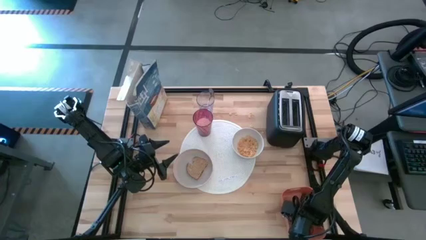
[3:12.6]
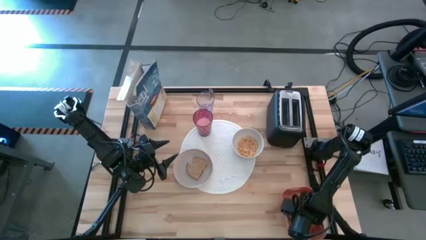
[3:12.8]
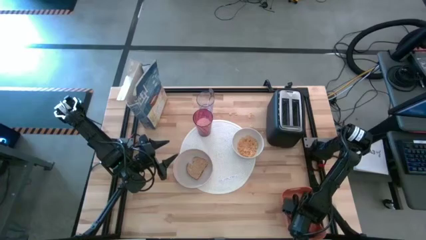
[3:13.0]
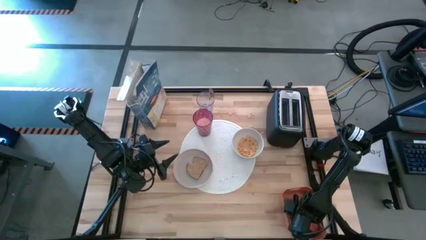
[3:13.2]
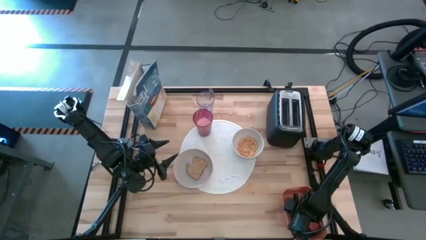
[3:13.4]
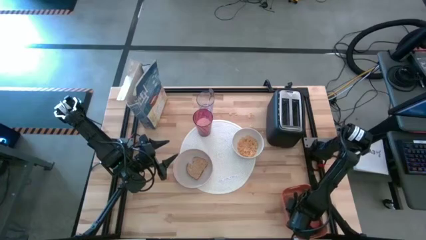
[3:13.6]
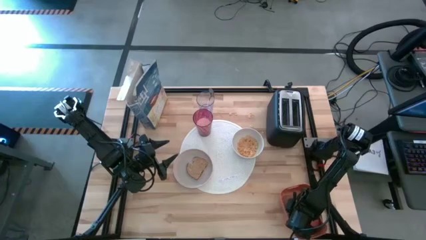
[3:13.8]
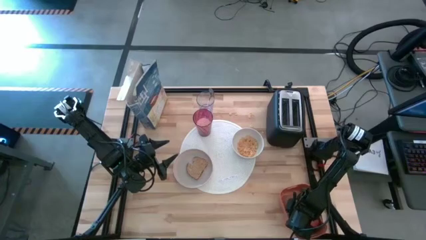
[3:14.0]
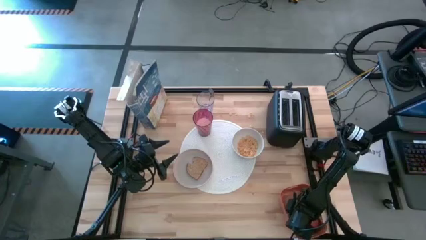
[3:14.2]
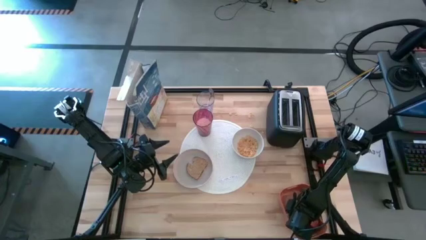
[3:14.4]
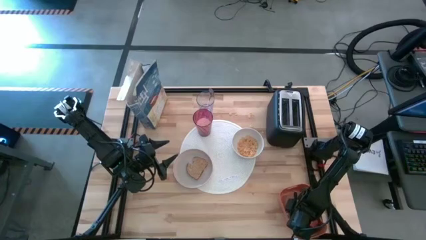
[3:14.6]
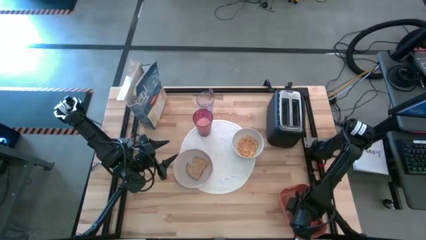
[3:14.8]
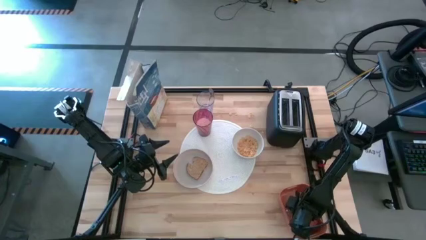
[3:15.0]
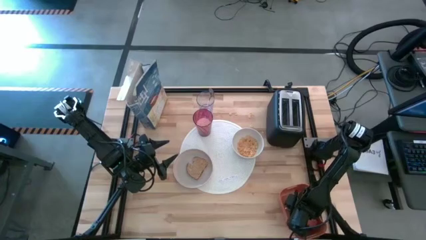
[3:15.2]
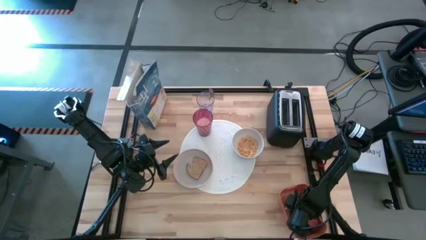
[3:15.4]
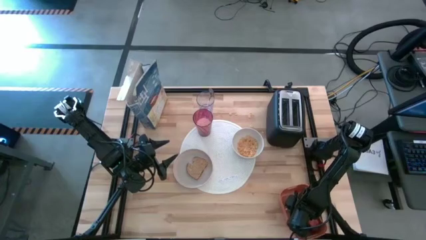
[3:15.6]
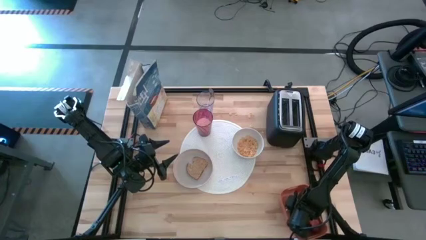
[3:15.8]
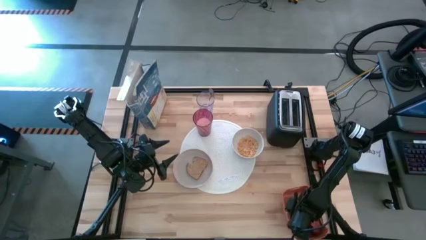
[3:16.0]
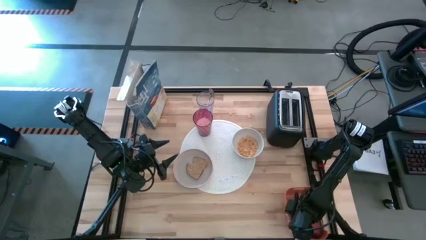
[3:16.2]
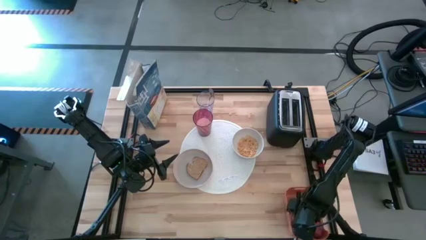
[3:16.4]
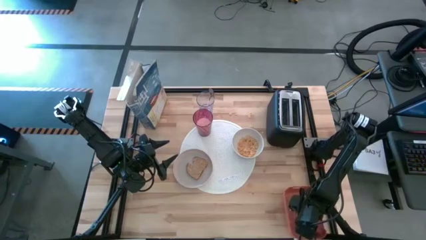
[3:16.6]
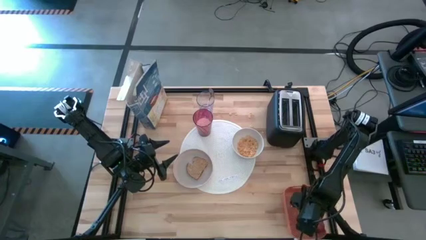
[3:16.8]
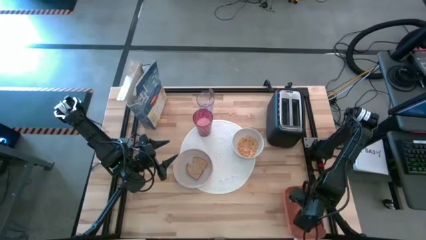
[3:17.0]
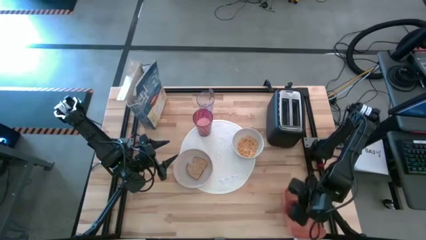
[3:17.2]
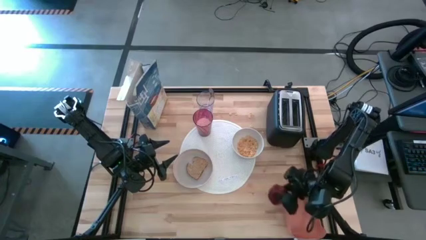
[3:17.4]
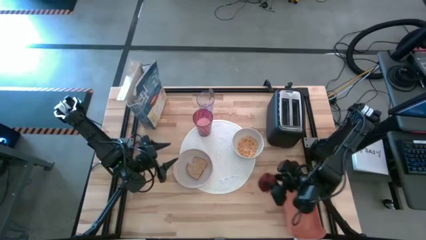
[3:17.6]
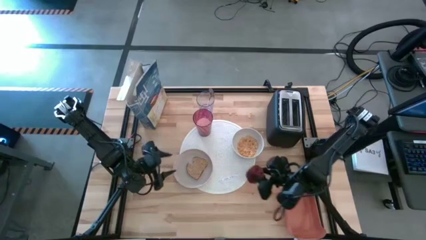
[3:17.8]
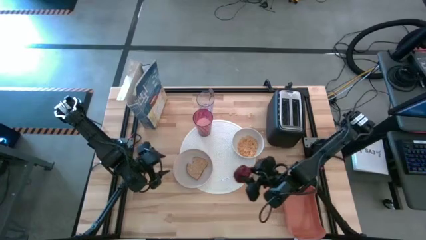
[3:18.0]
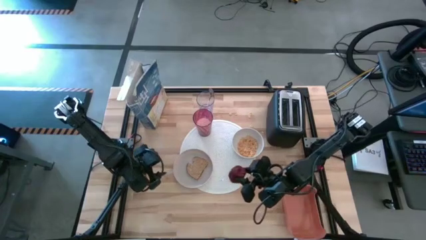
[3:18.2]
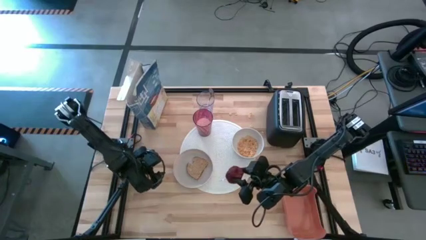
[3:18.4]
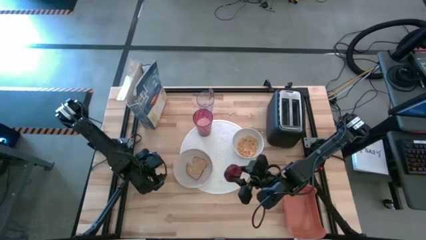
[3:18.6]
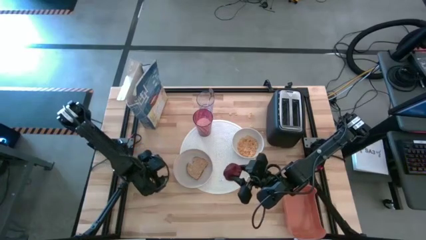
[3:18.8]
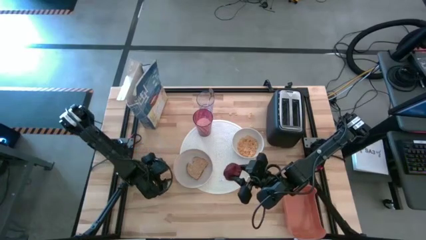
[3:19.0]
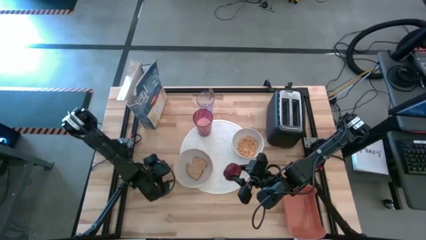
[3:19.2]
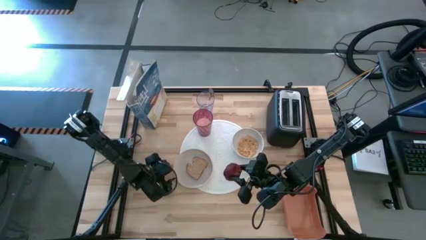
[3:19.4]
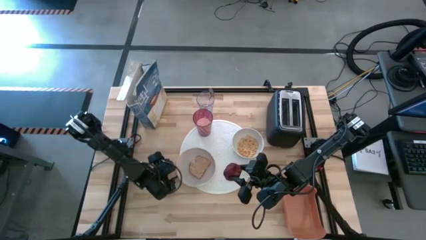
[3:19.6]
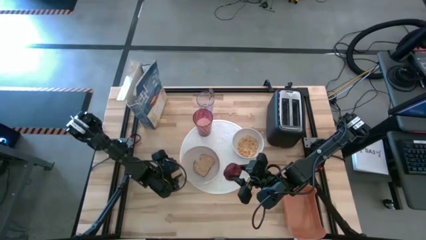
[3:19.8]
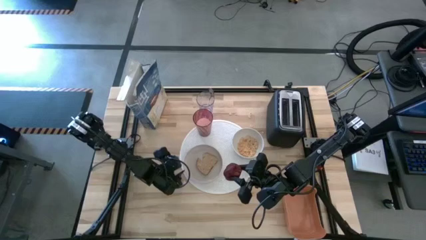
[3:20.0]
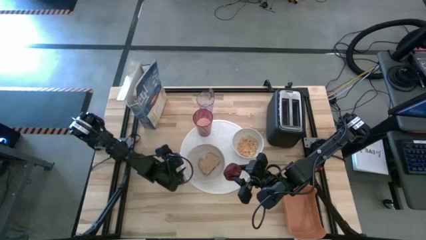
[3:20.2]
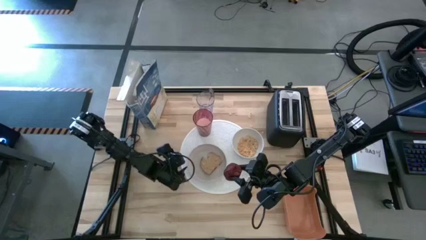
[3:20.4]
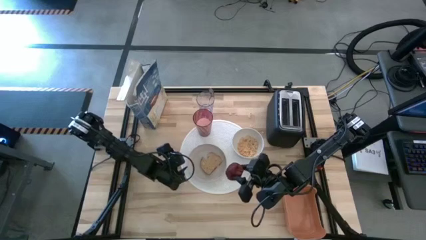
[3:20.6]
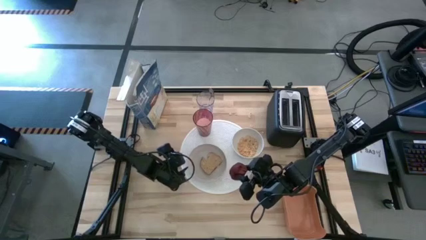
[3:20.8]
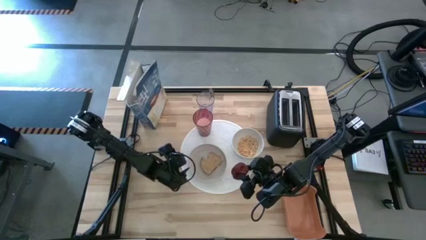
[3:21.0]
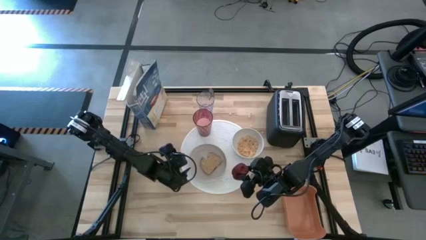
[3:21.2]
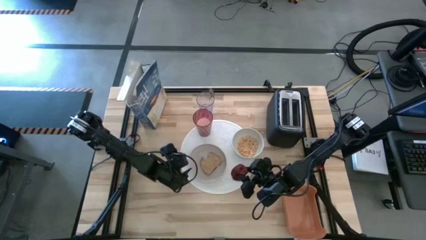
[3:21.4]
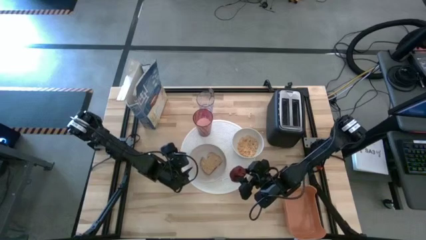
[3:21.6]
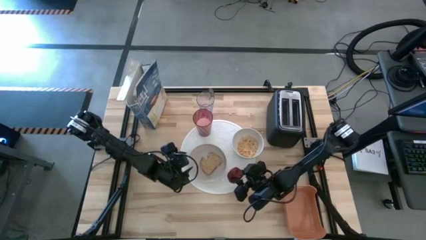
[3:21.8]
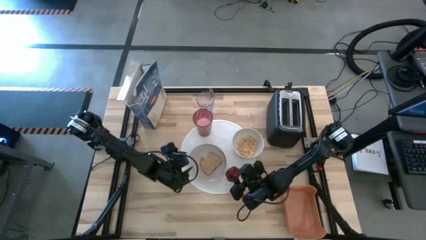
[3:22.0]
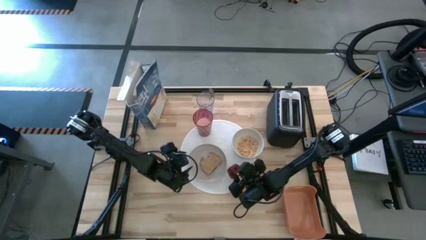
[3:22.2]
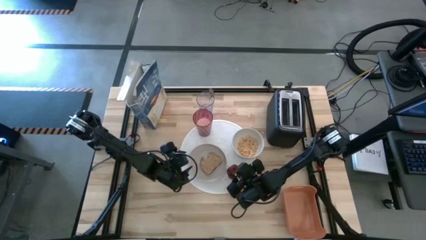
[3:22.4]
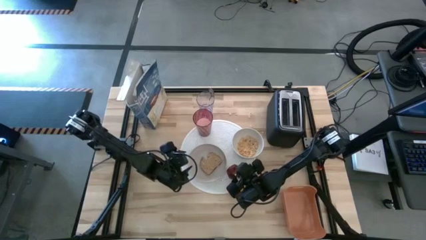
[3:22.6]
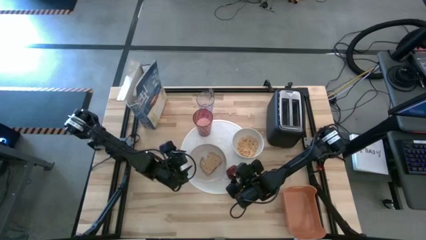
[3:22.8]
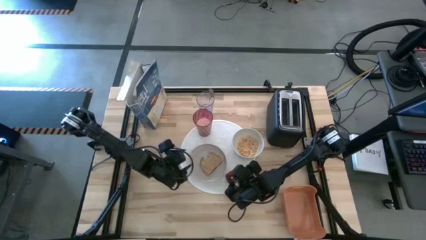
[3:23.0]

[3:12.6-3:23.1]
Task: Arrange a breakfast setting
Put the apple on the white table mat to the bottom of the brown plate

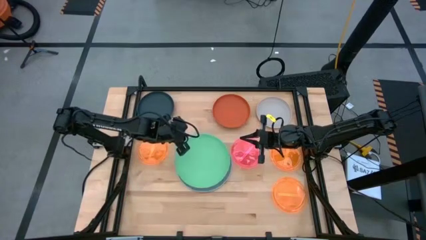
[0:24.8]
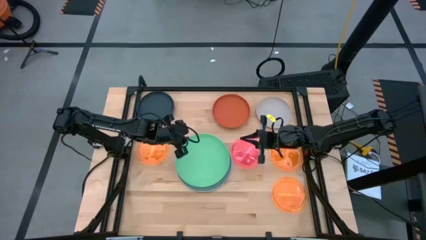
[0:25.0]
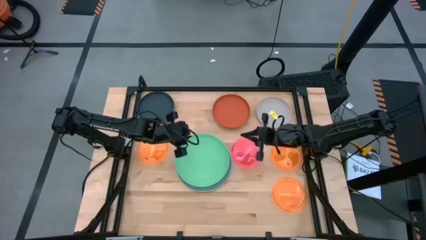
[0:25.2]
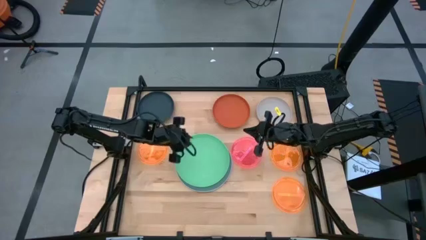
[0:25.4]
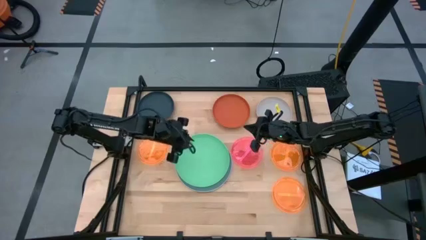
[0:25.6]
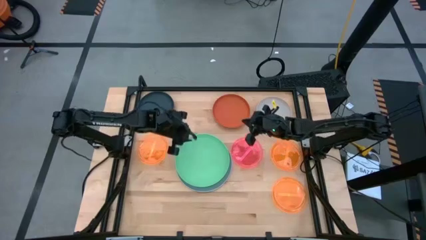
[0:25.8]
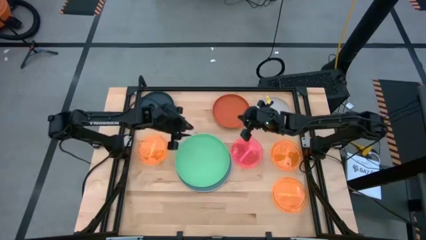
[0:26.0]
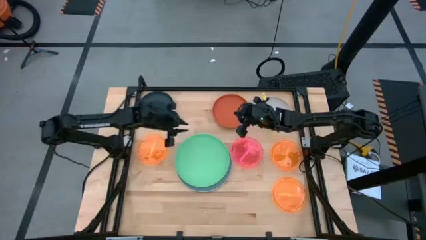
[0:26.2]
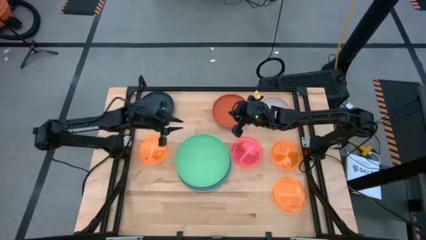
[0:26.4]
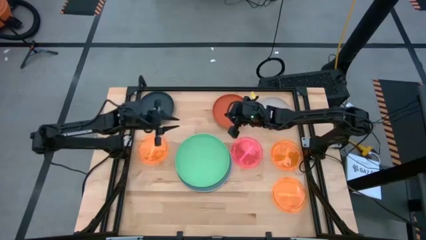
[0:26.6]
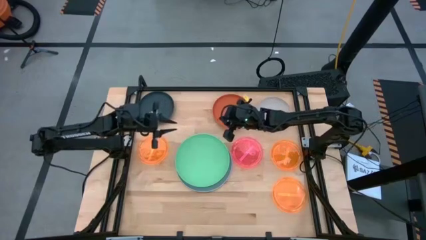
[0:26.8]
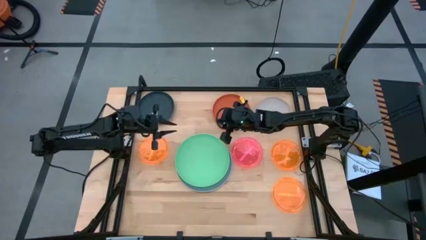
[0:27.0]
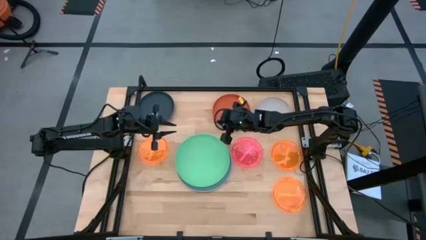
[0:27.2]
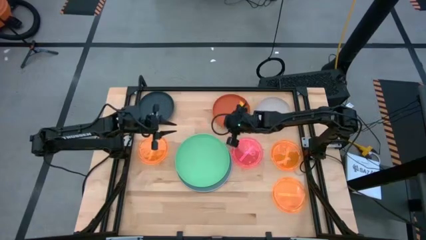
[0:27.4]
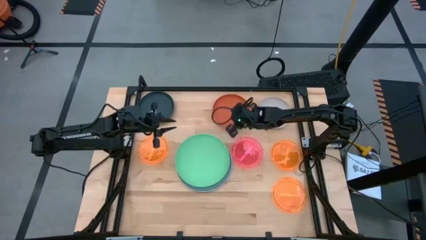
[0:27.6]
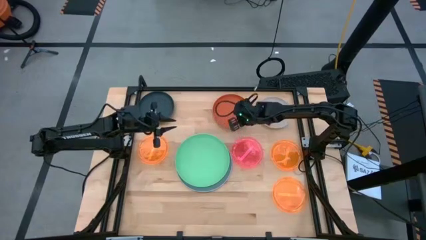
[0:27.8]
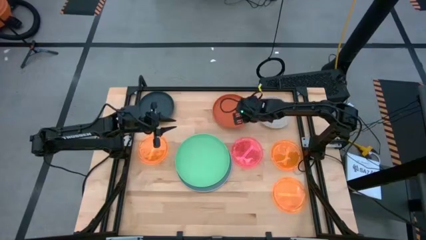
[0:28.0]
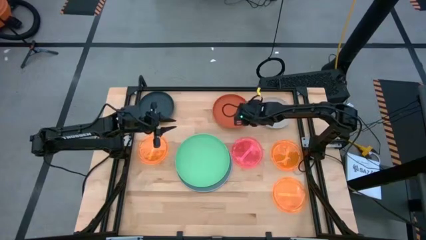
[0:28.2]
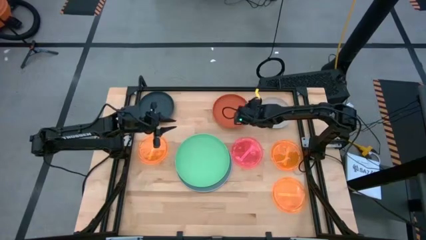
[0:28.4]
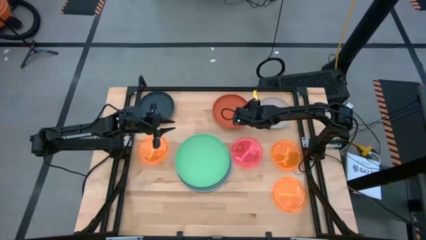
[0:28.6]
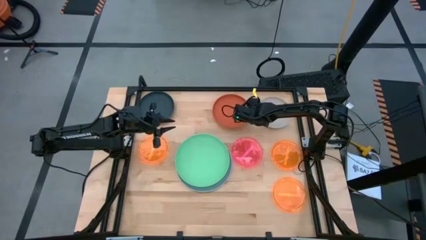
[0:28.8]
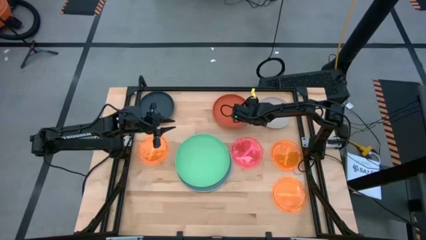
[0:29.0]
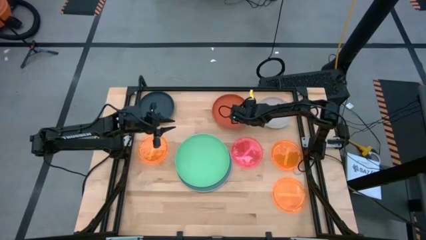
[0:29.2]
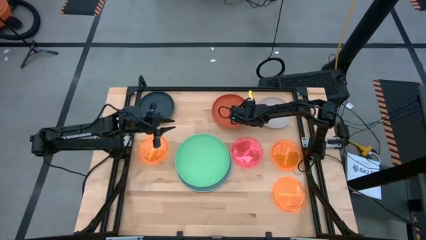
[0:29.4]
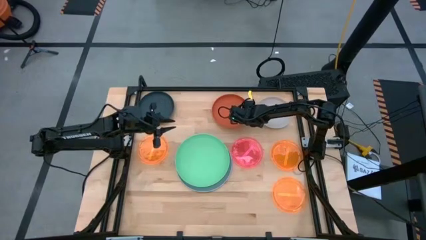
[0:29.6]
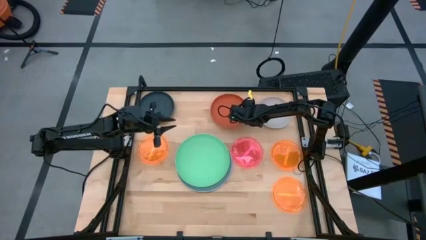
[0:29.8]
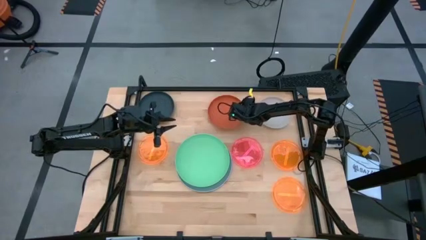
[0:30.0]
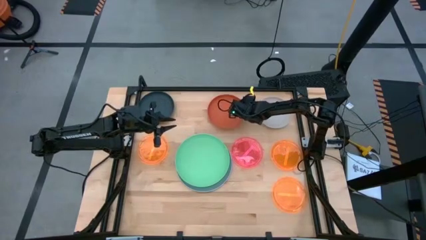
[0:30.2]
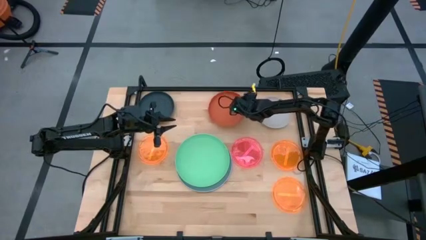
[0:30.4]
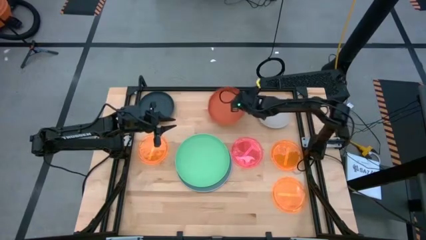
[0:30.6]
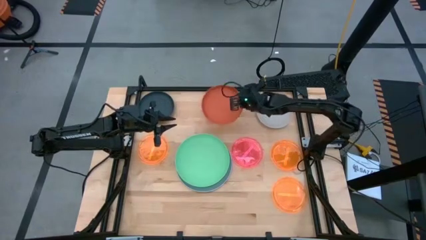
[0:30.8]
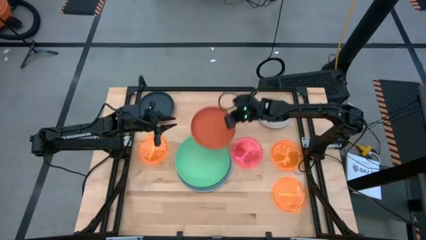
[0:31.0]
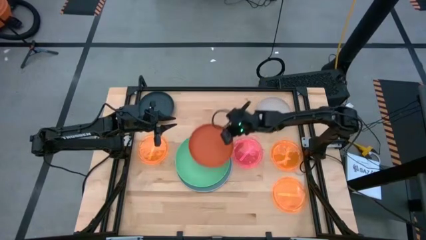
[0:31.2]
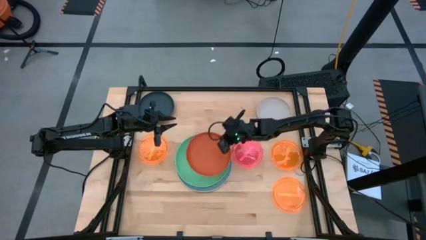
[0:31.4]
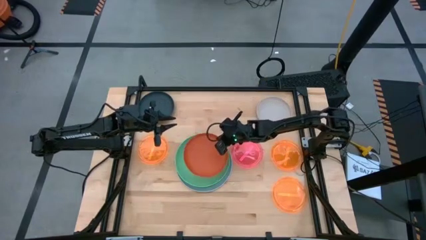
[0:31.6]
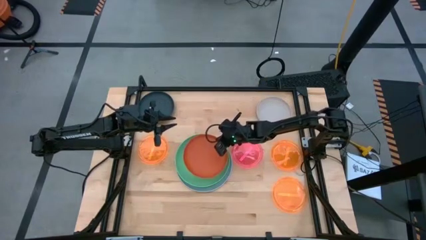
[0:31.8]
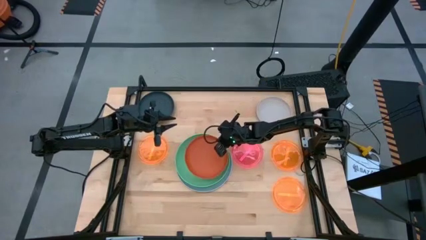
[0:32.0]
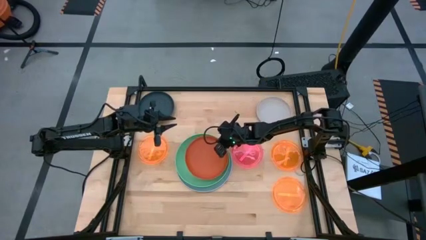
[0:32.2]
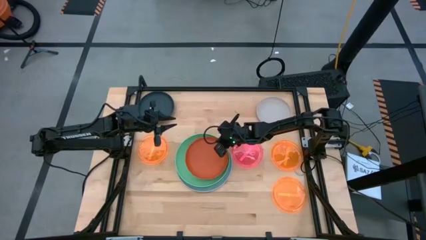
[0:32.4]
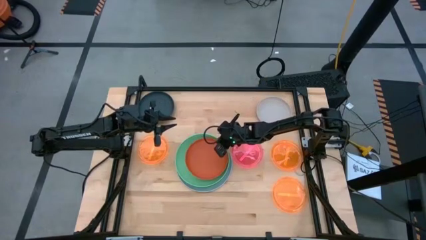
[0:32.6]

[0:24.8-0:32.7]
Task: Stack plastic plates
Stack the orange plate on top of the light green plate
